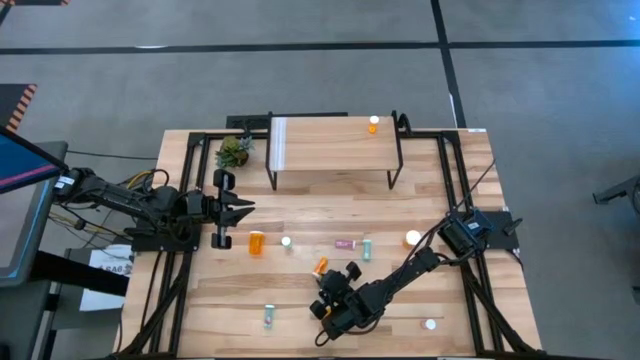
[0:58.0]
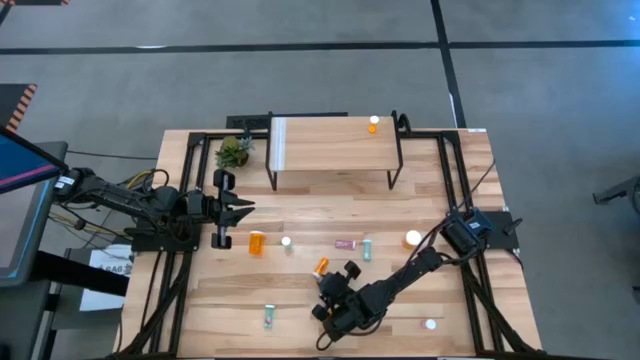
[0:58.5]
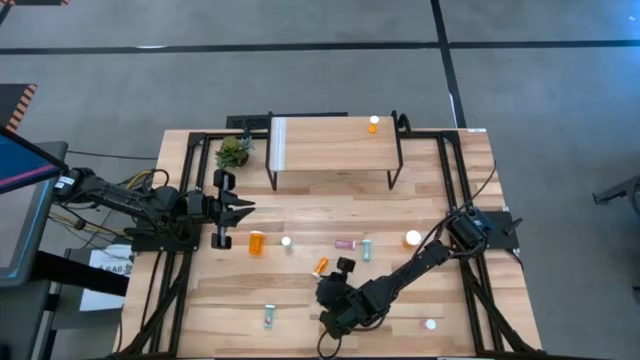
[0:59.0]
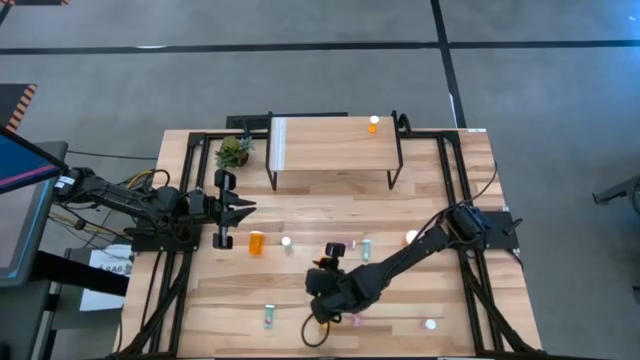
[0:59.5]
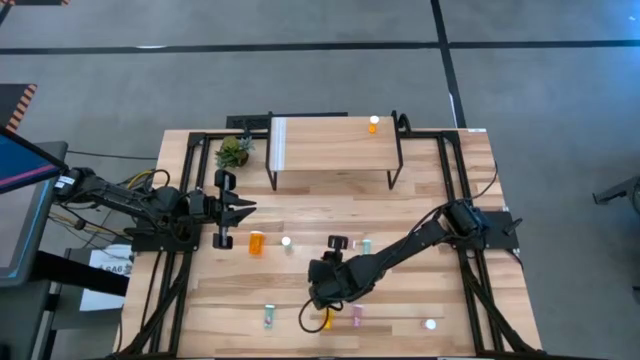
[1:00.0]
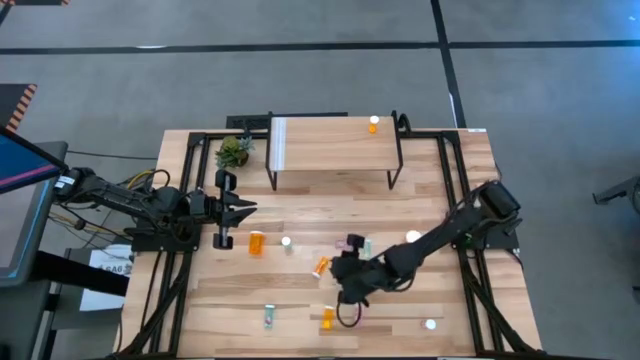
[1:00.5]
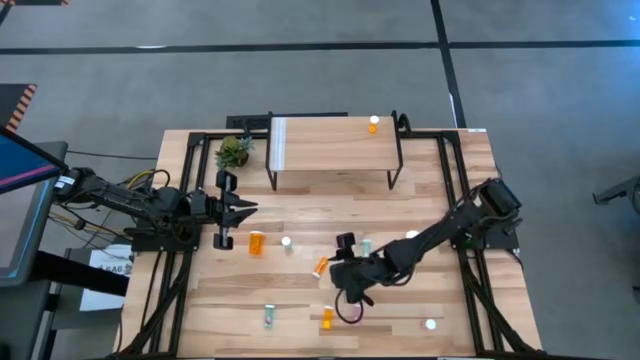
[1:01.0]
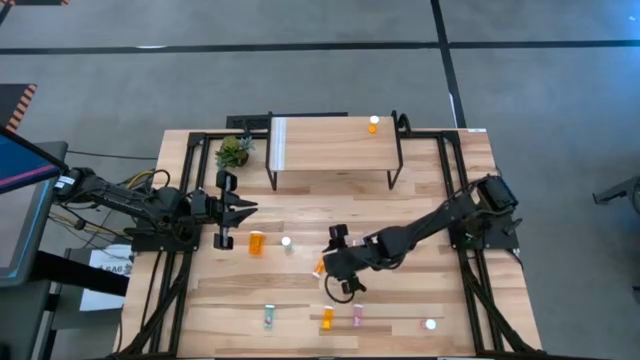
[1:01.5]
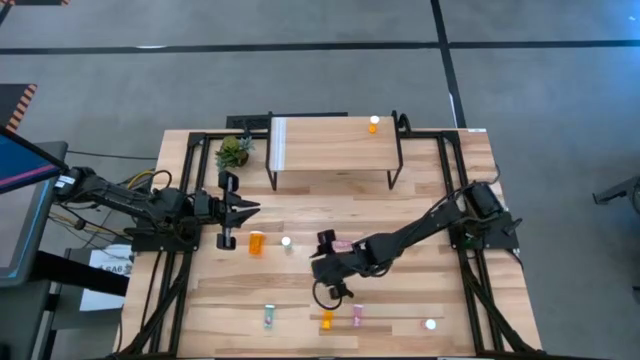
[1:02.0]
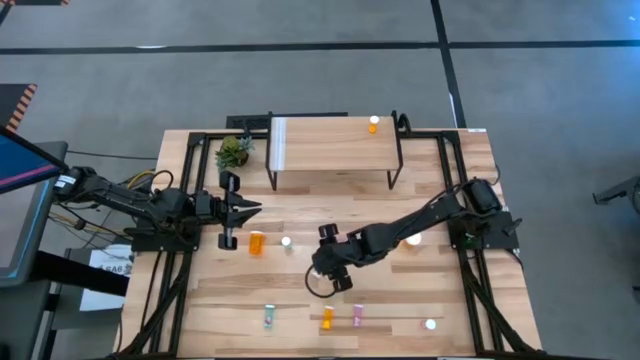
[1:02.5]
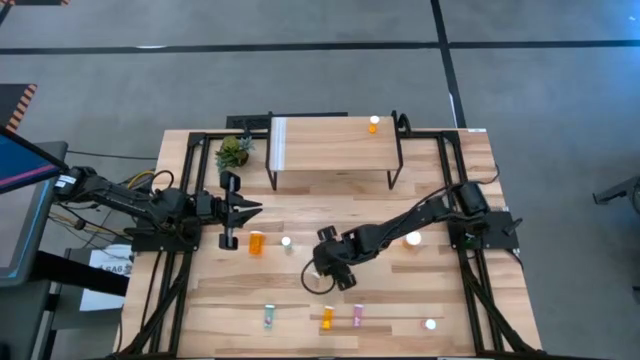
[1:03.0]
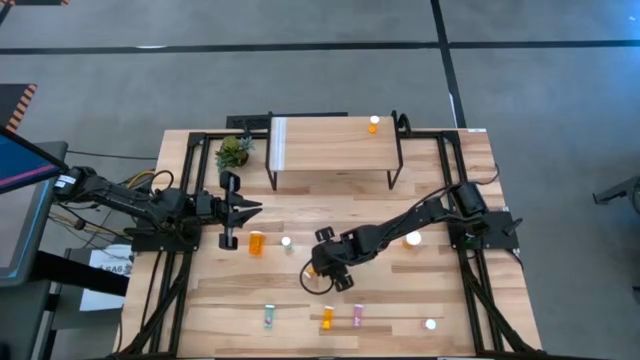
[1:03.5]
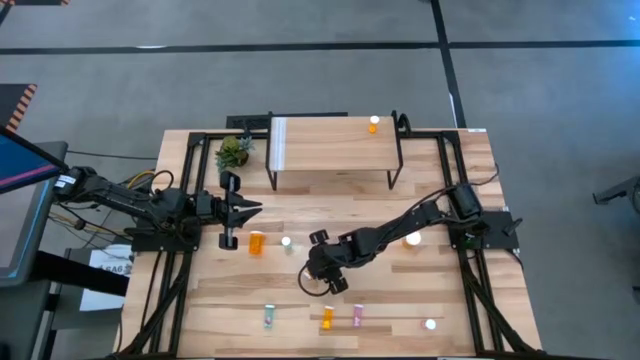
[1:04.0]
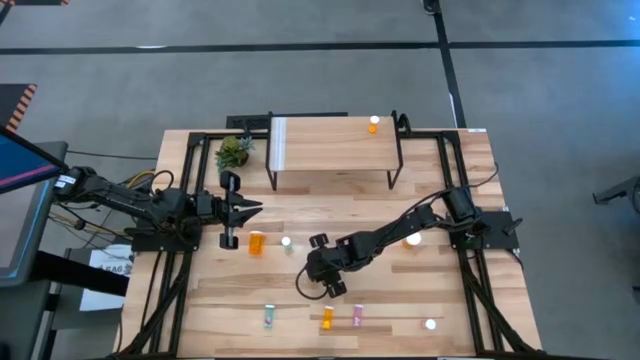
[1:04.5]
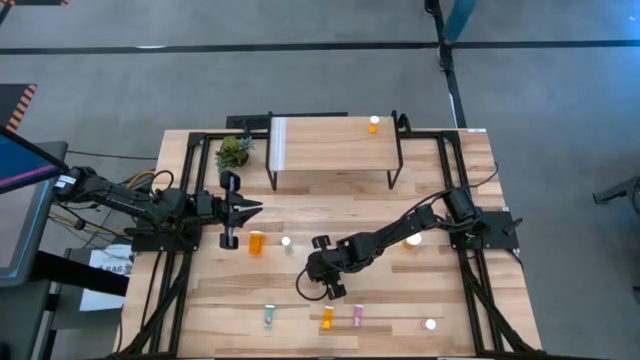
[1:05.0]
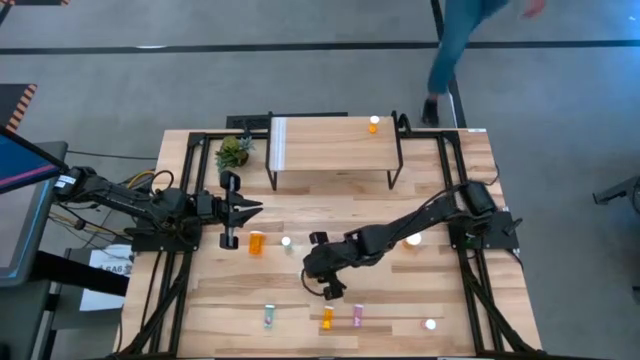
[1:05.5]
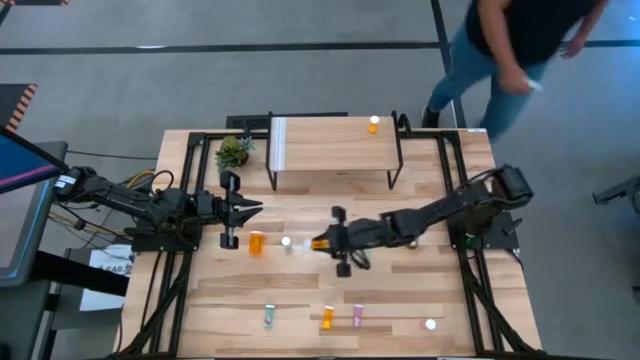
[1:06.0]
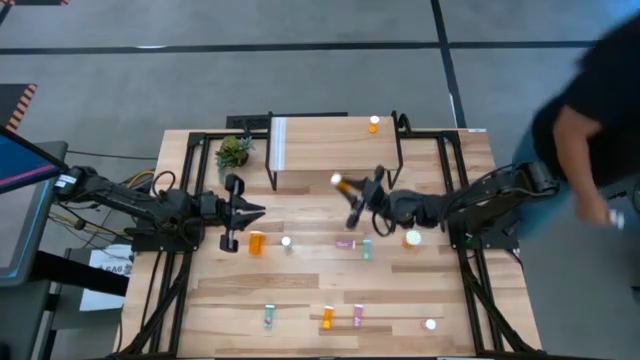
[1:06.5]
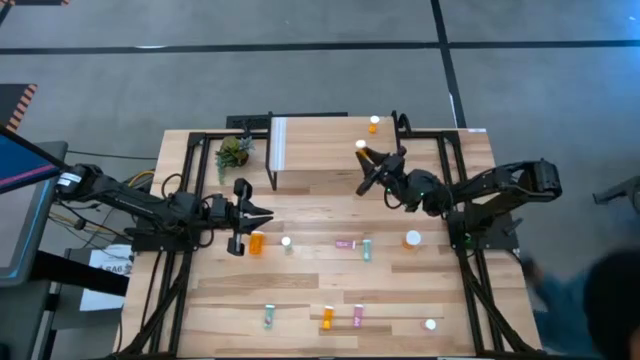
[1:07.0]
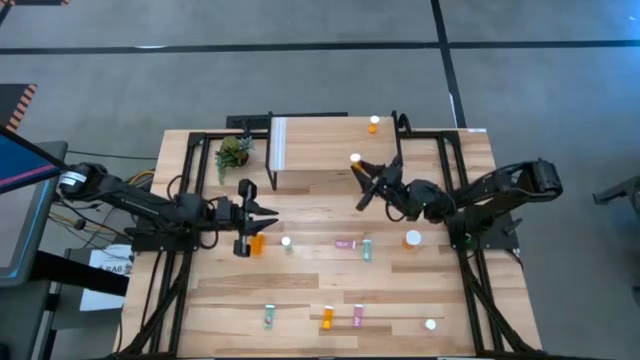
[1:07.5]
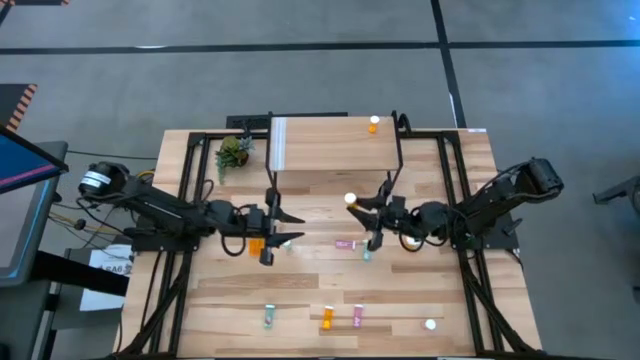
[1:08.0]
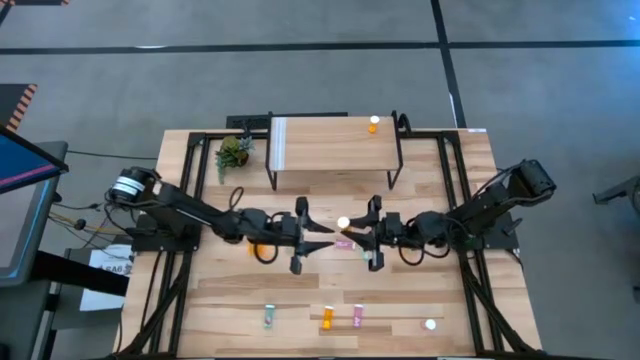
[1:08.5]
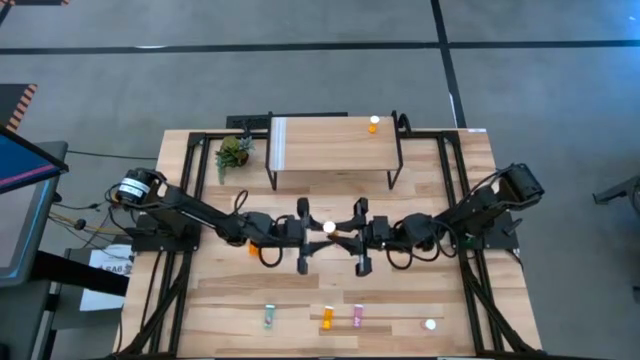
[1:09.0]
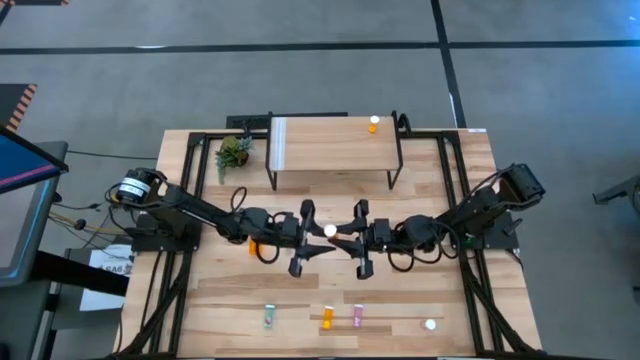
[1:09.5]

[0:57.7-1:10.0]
Task: Pick and place medicine bottles onto shelf by color
Put the top small orange pill bottle on the shelf aligned with the other small orange pill bottle

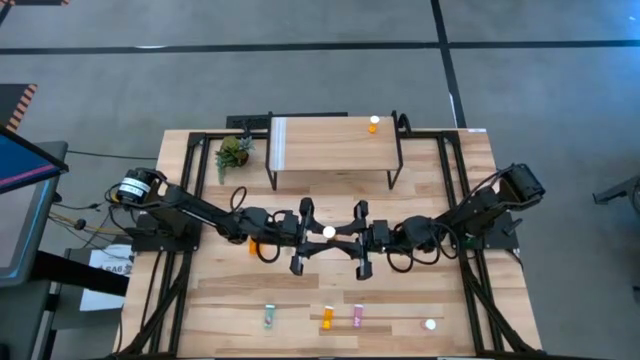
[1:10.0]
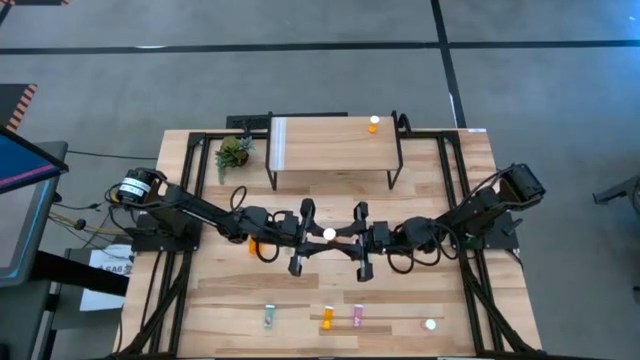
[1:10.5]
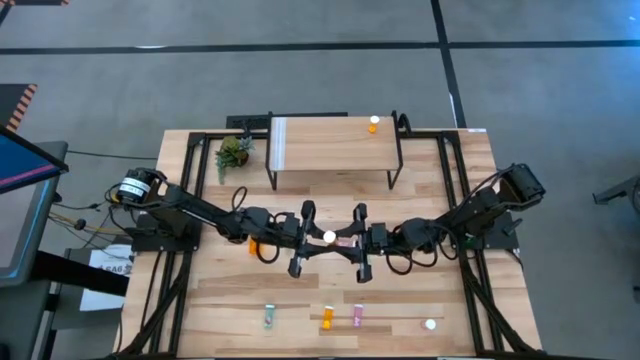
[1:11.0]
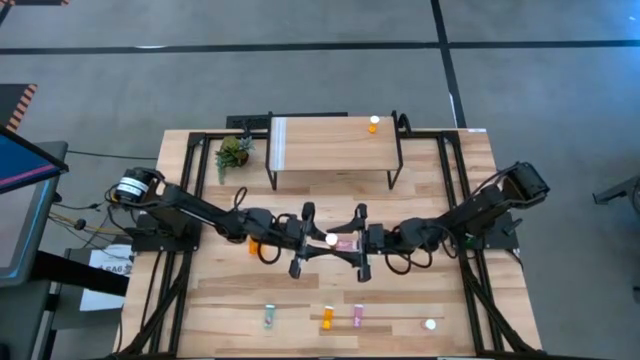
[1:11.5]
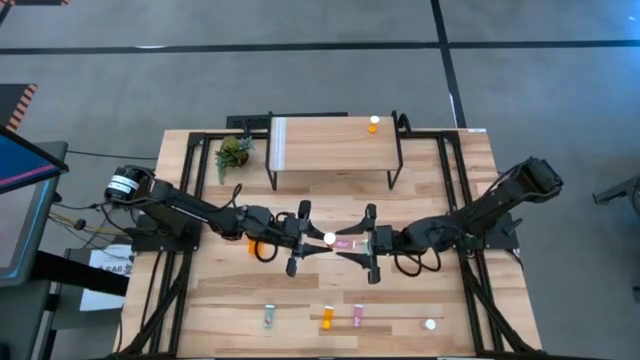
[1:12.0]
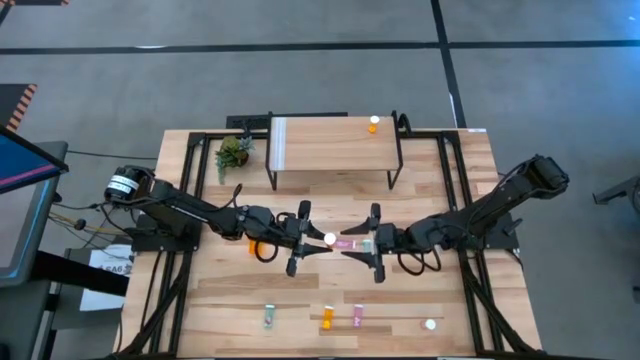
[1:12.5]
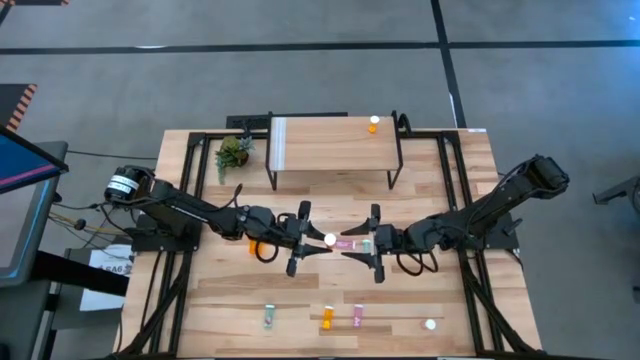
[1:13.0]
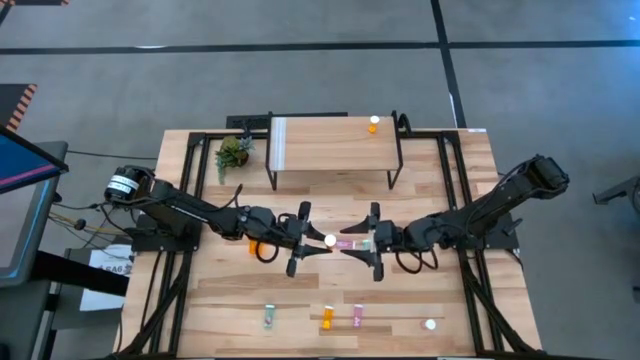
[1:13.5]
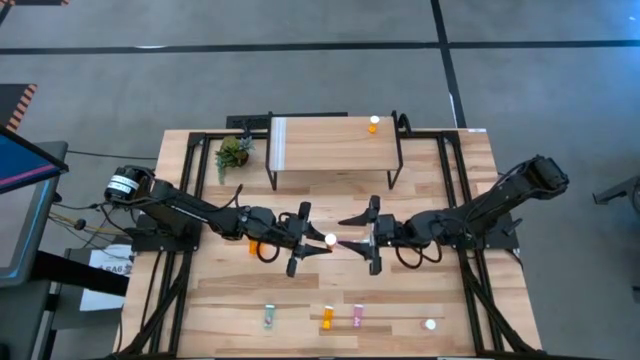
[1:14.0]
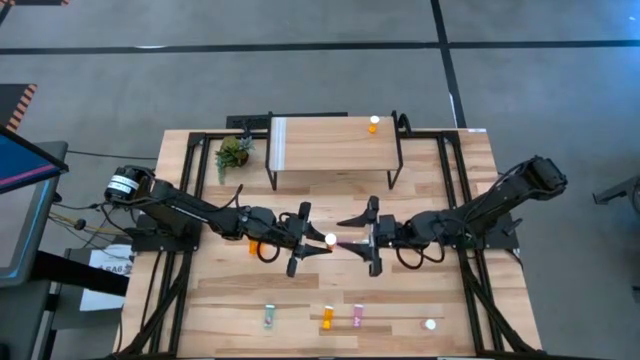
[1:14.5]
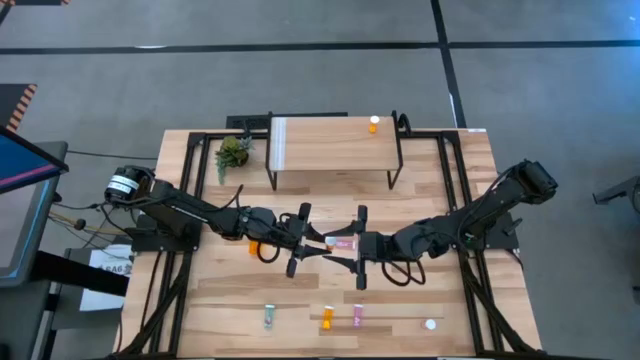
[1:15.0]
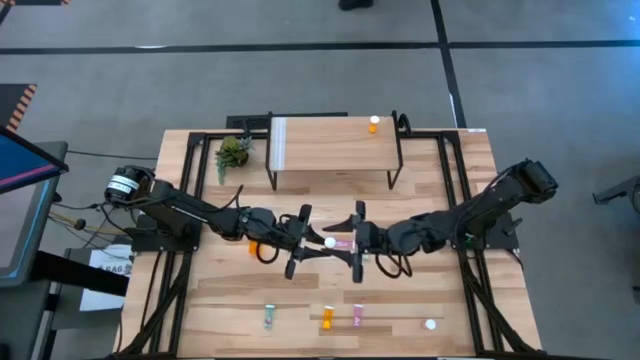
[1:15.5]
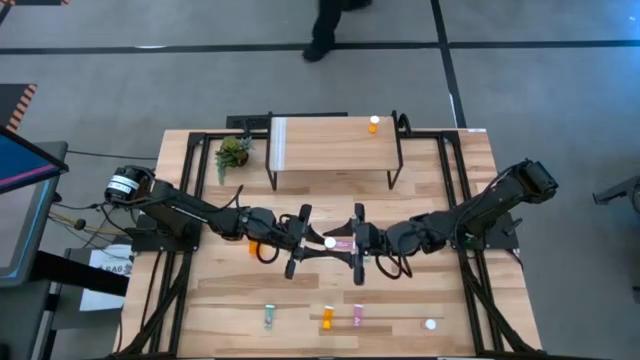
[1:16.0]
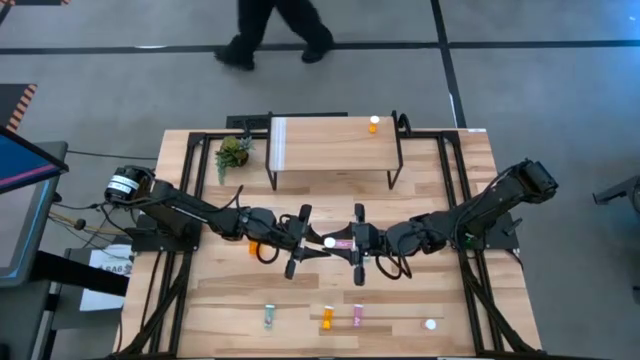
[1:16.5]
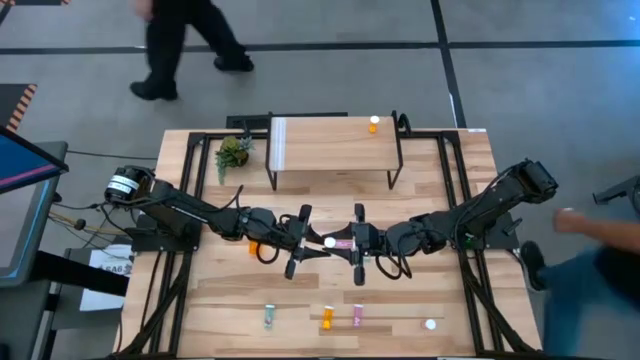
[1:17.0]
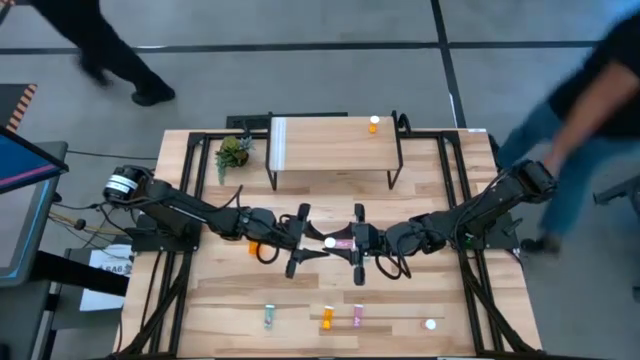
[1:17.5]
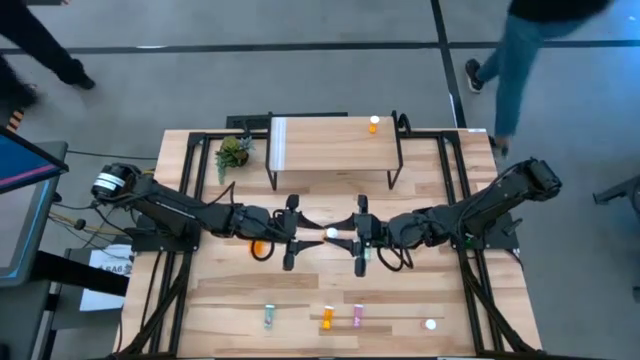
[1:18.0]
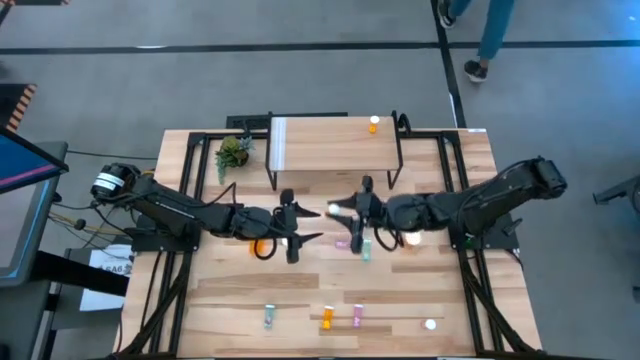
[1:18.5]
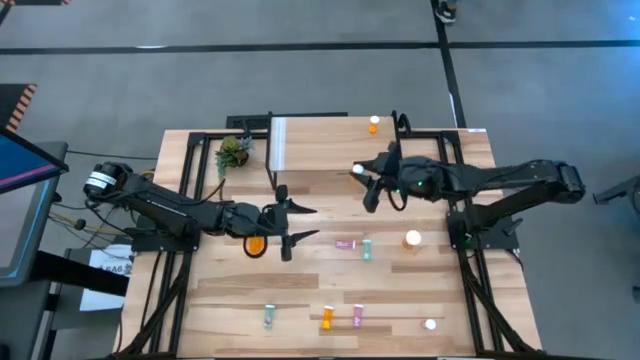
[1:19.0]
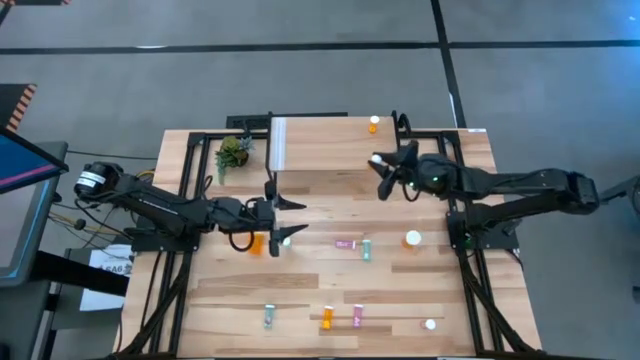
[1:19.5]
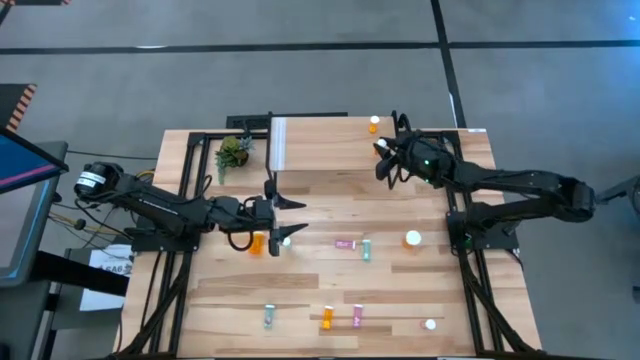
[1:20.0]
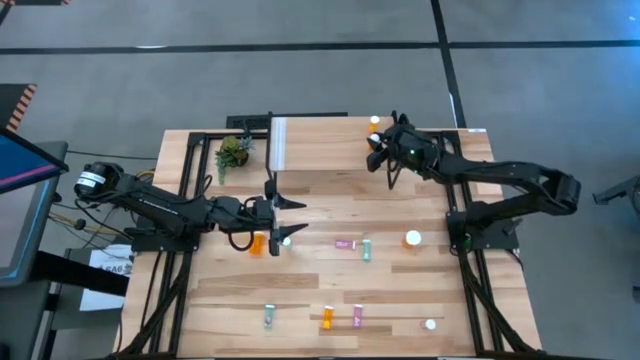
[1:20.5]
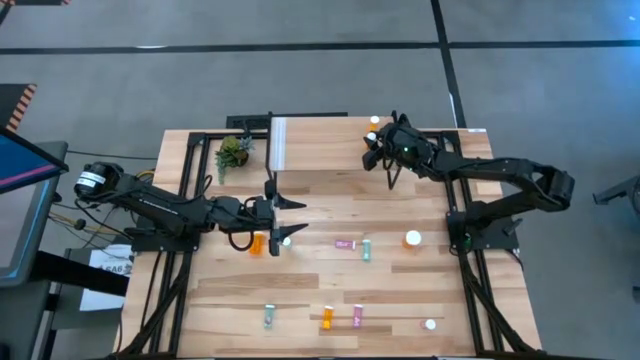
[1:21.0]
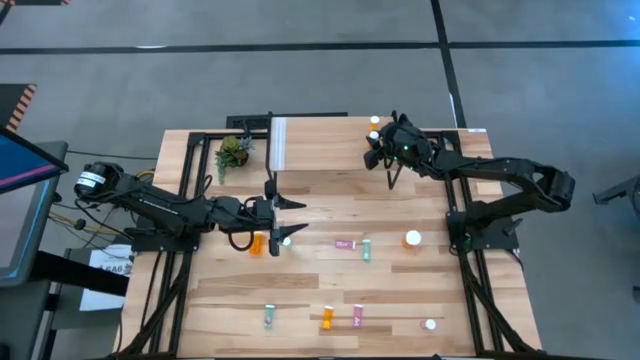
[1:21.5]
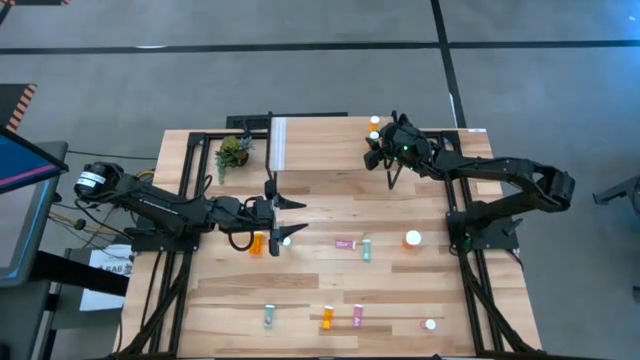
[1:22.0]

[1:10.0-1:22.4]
Put the top small orange pill bottle on the shelf aligned with the other small orange pill bottle
